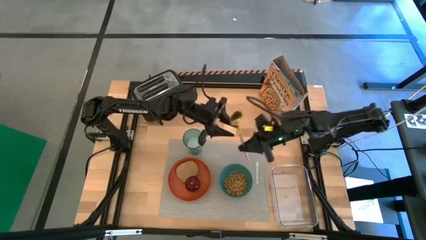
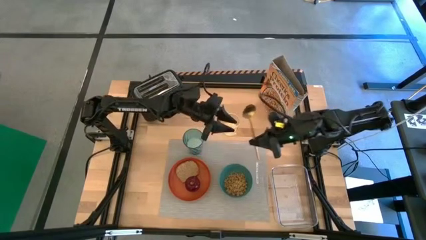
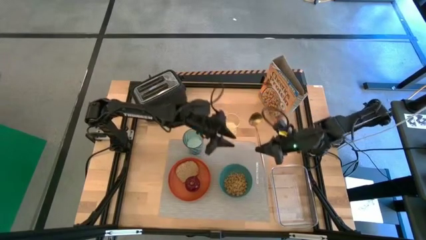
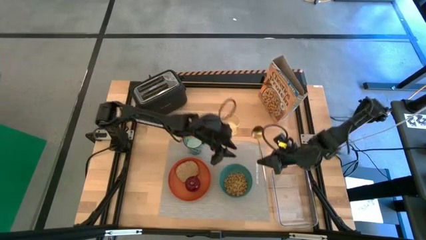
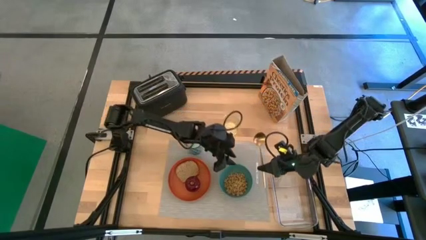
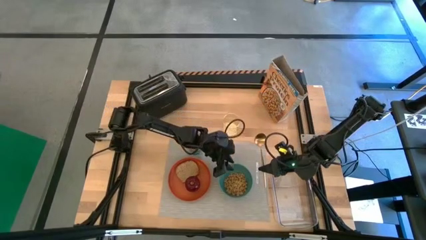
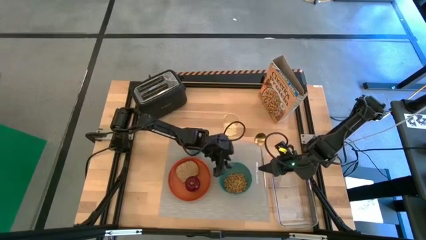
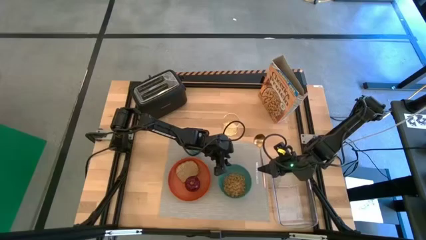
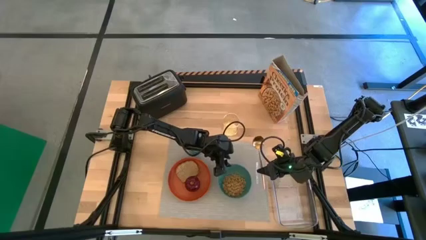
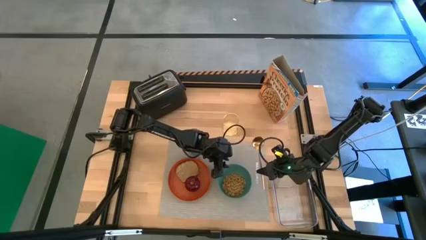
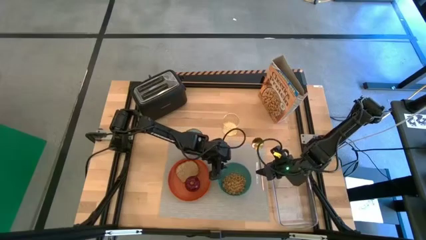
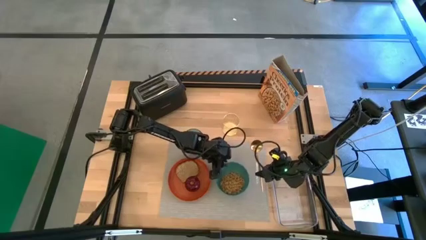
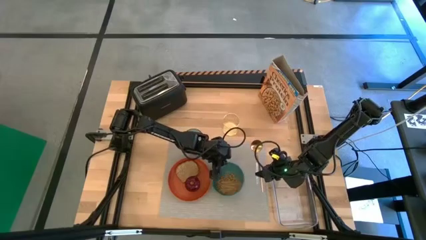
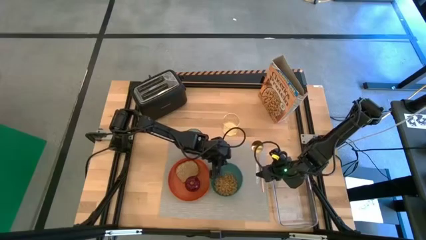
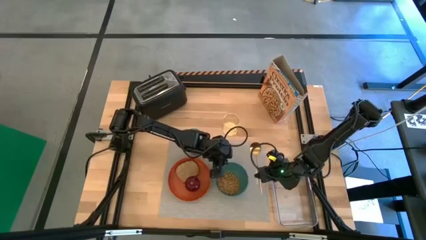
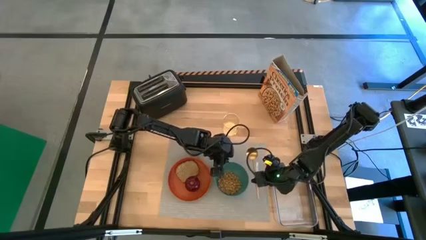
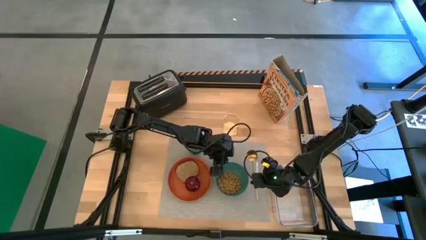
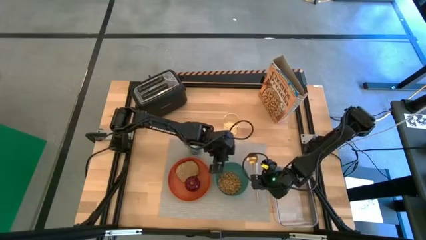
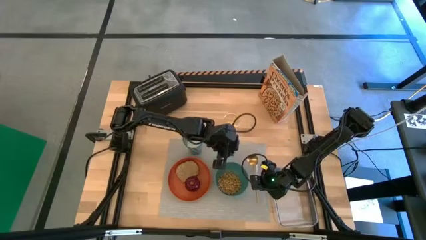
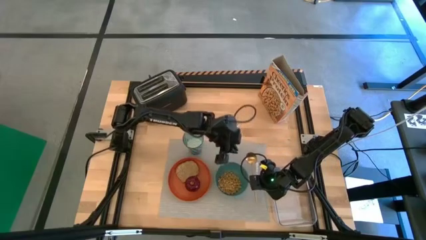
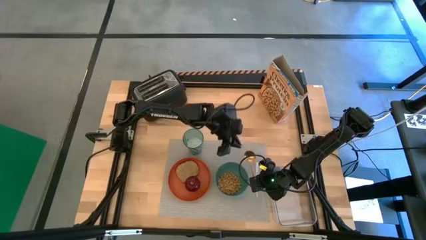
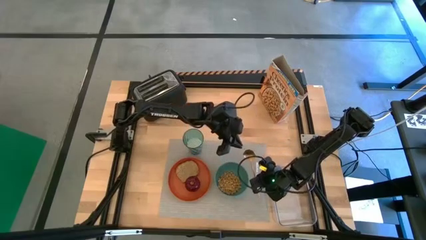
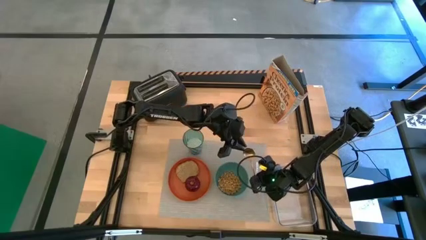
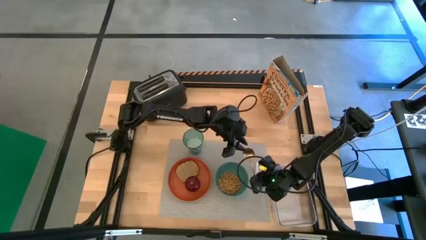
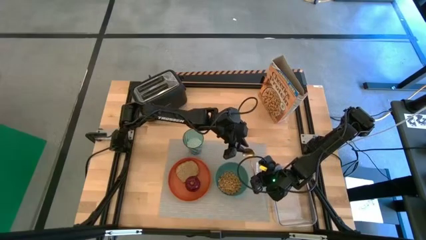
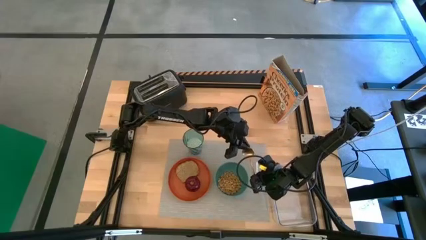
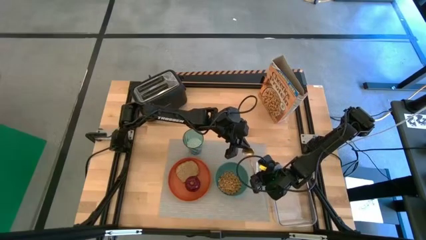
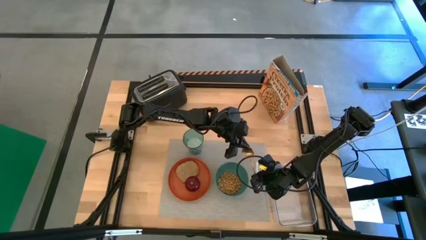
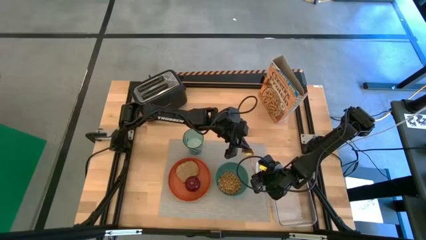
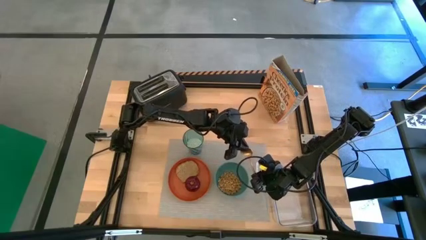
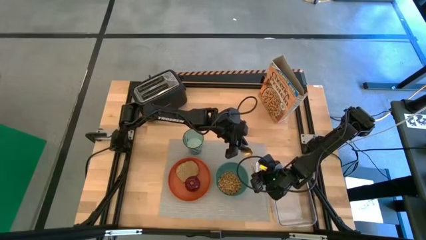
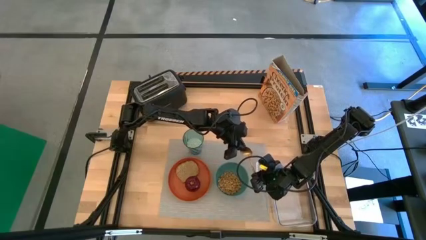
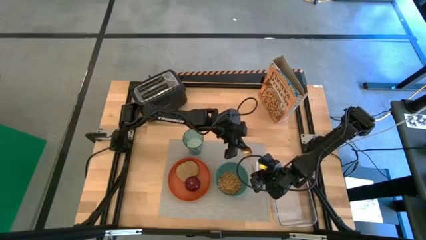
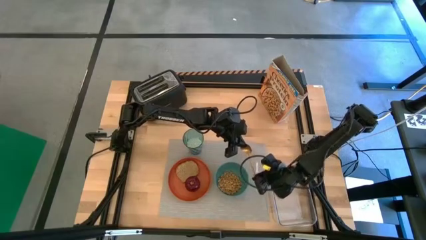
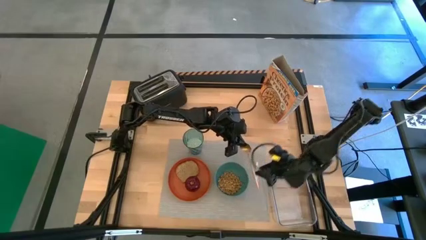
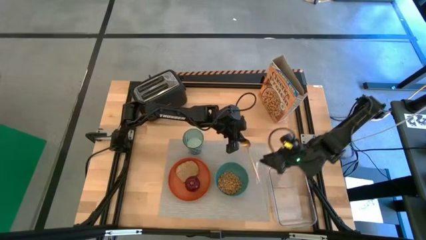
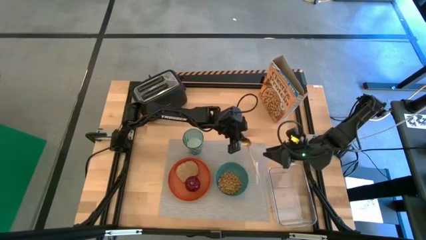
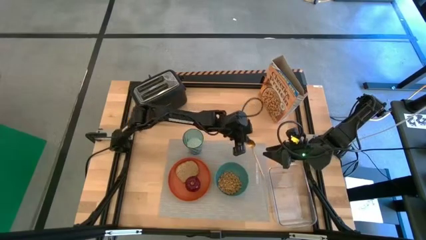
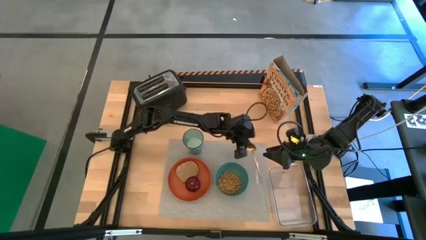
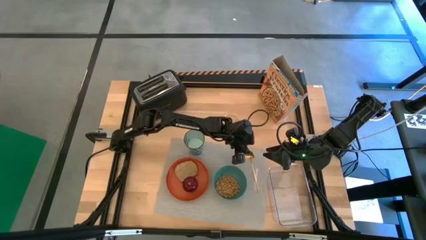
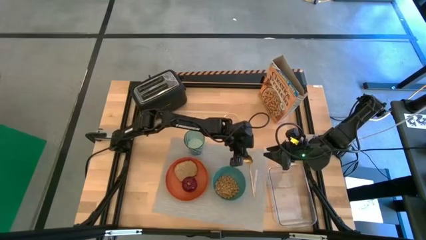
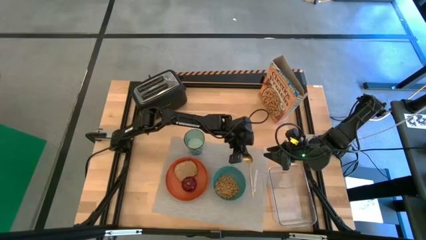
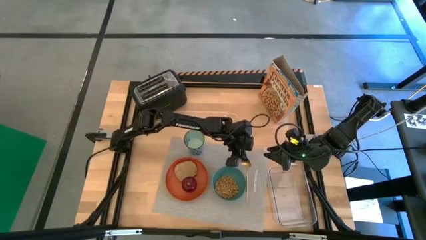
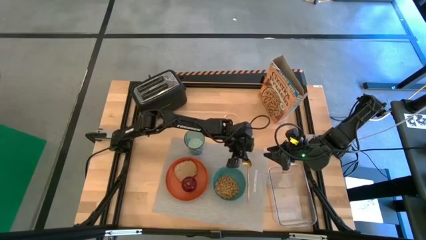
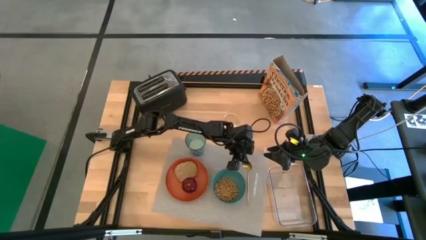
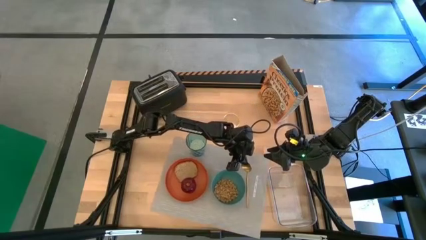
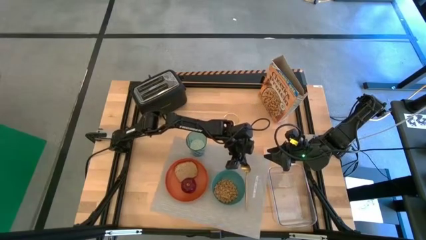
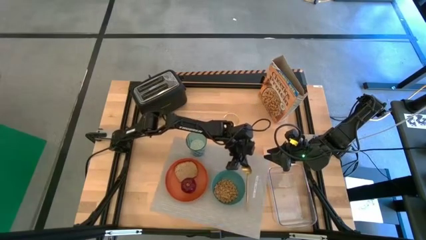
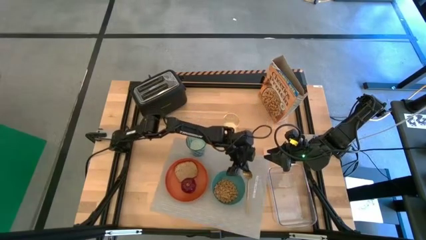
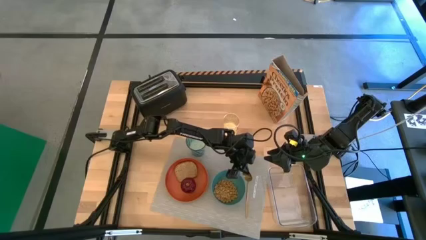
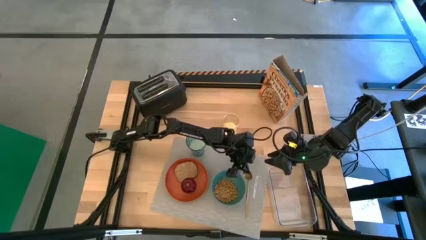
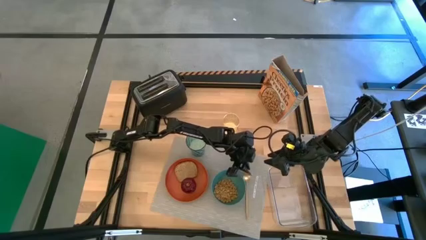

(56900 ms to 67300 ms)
Task: Arrange a breakfast setting
Put the gold spoon on the gray tablemat to the right of the green bowl

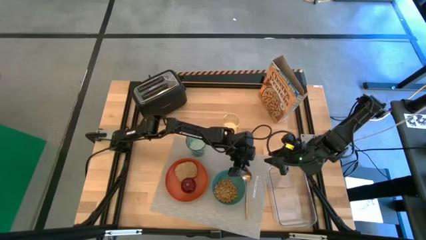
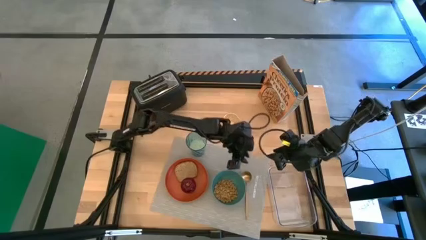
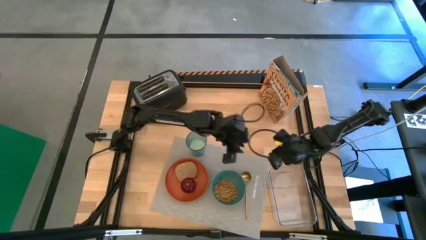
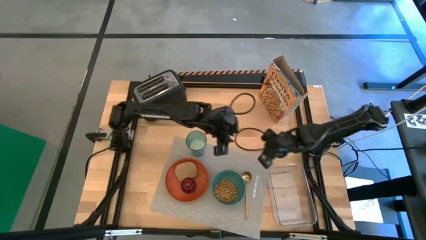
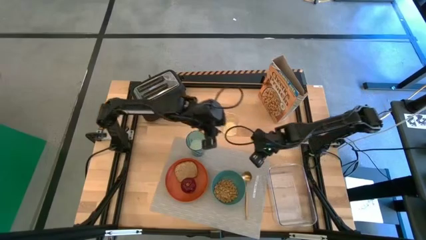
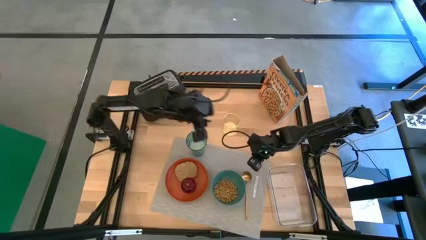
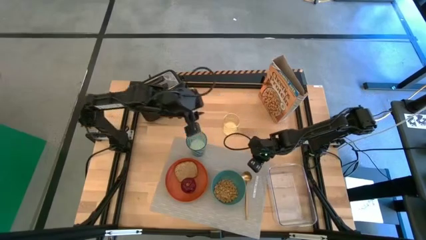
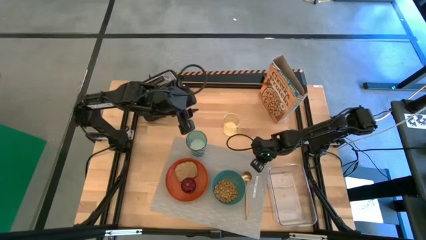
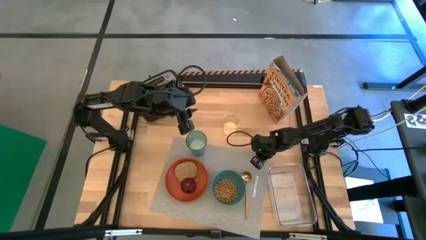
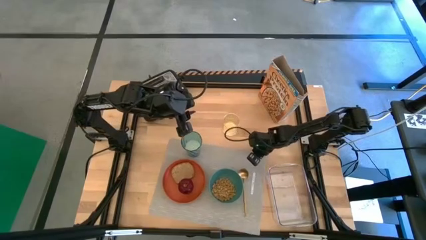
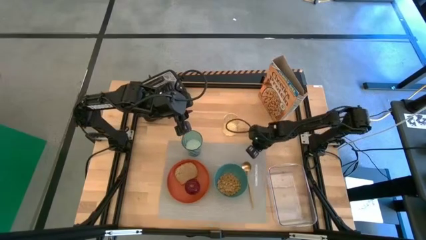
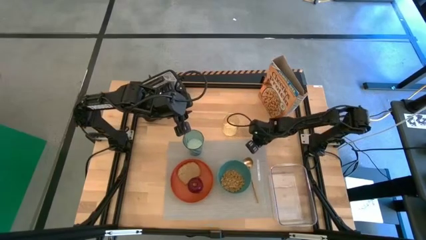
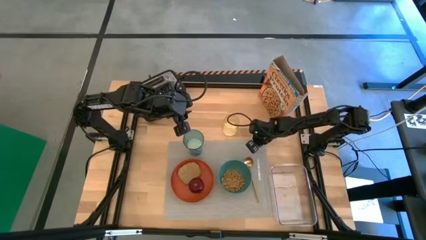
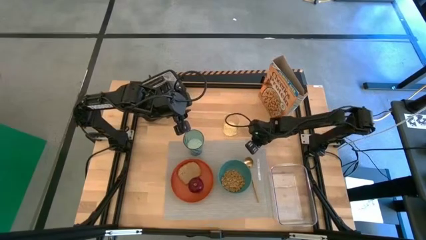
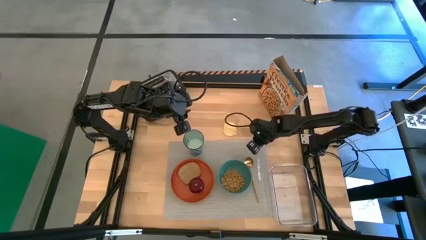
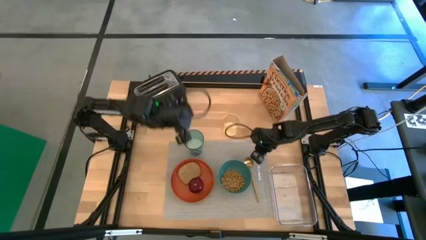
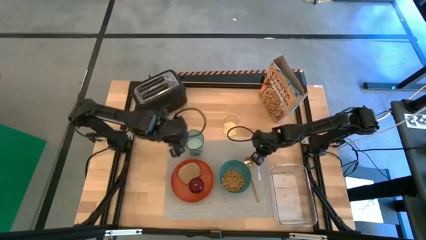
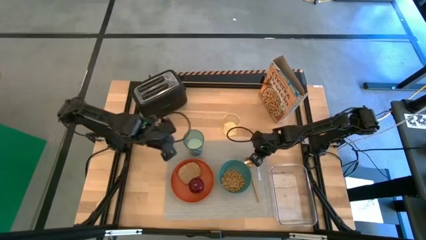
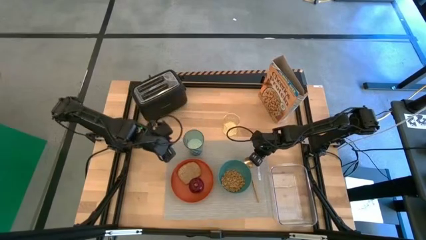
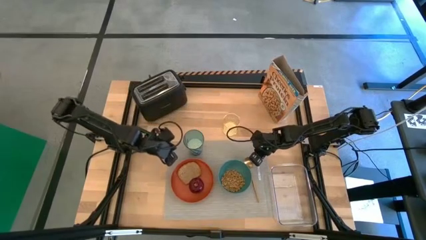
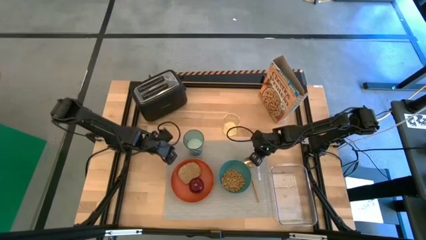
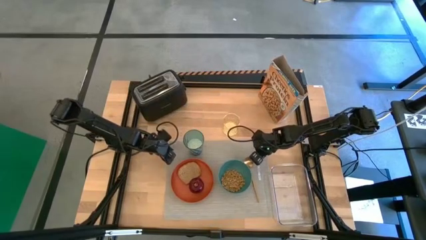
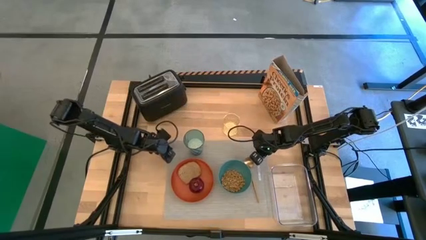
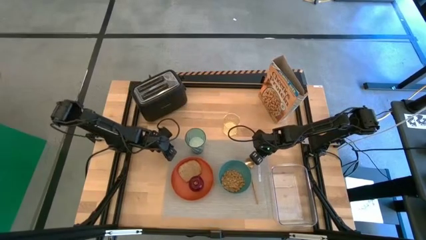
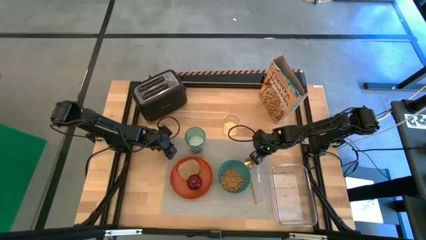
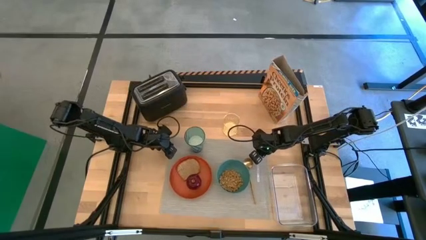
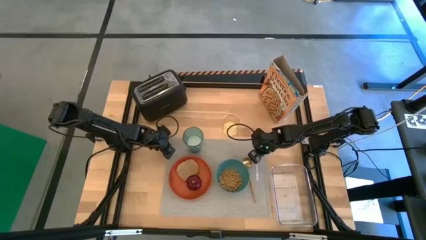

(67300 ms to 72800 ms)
Adjust the gray tablemat

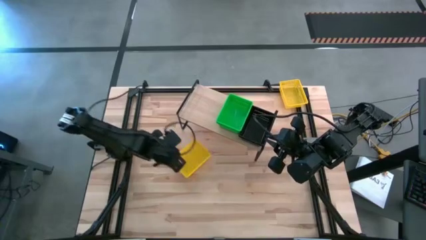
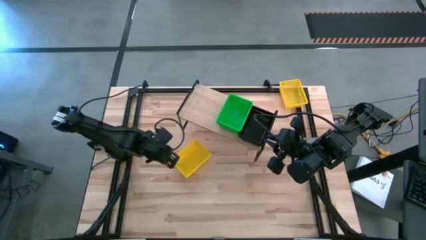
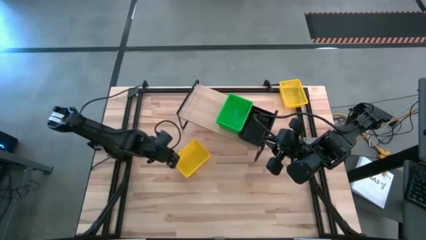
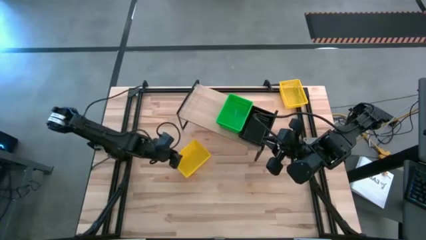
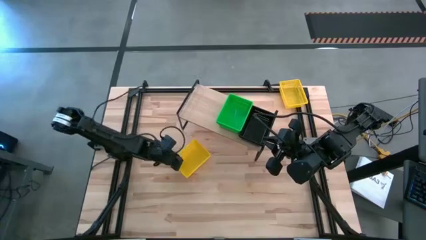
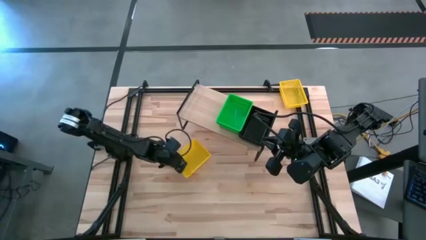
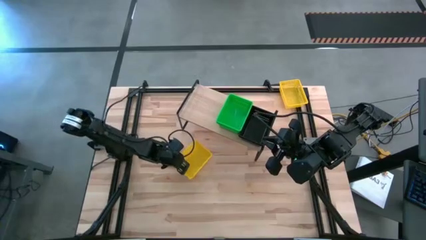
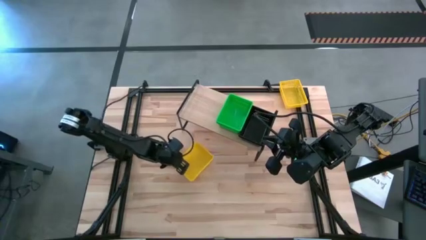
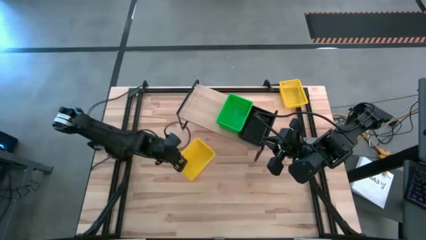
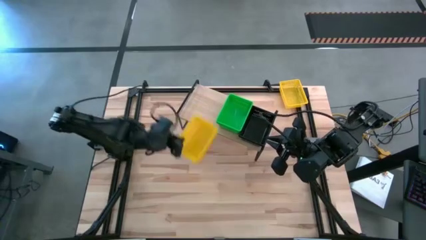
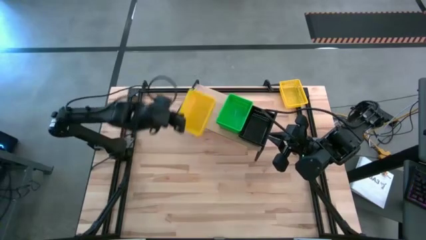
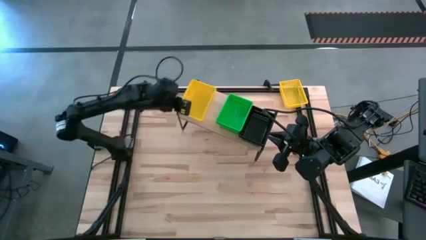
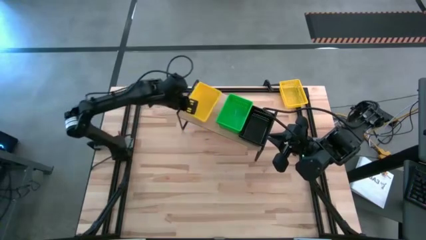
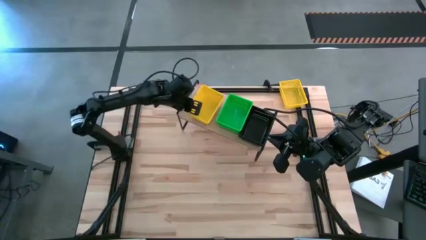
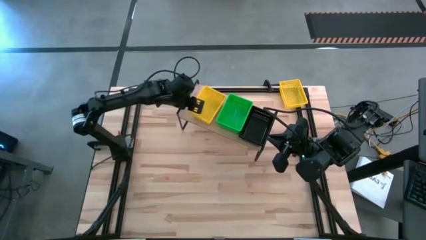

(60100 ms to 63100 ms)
Task: Stack baskets on shelf by color
Put the stacked yellow bins on the shelf
